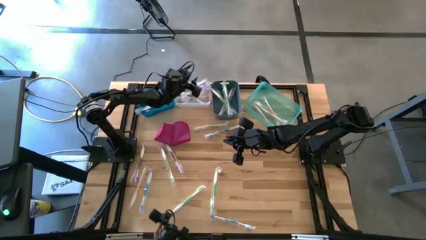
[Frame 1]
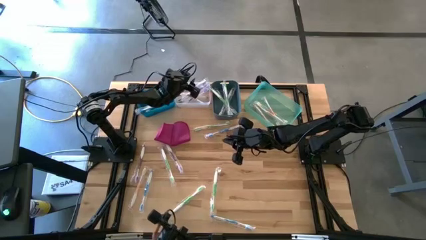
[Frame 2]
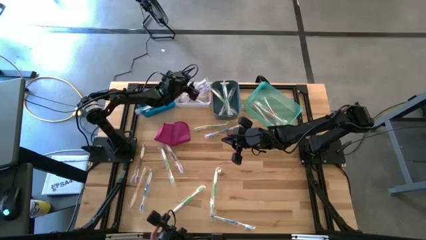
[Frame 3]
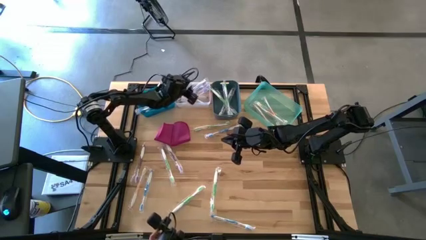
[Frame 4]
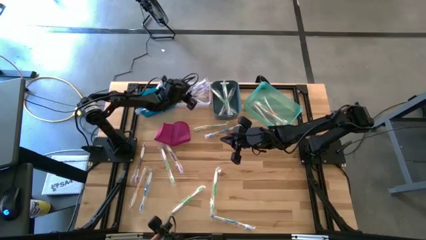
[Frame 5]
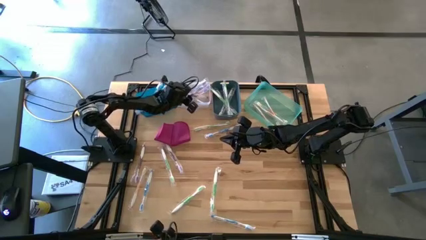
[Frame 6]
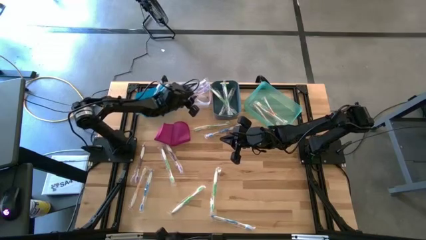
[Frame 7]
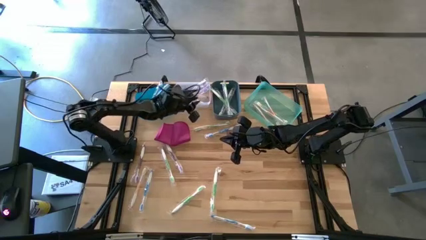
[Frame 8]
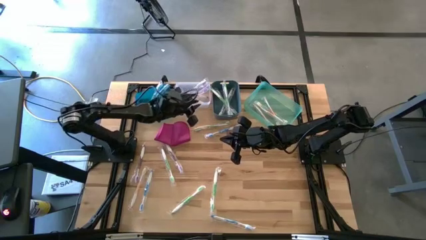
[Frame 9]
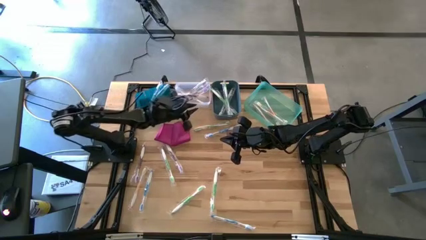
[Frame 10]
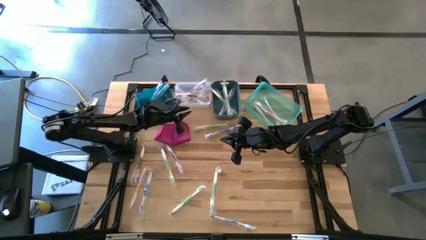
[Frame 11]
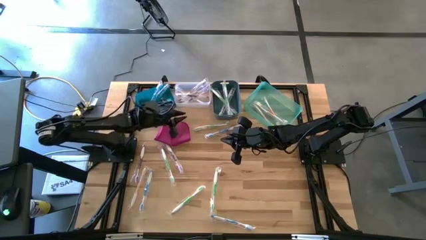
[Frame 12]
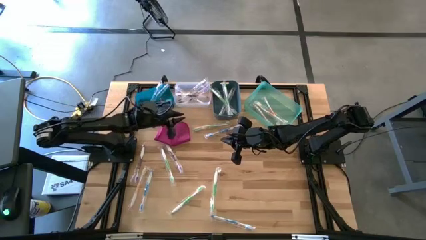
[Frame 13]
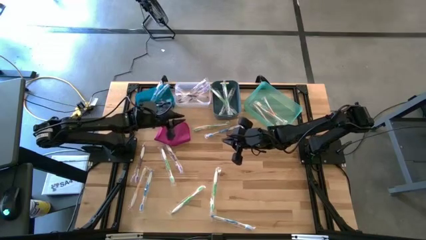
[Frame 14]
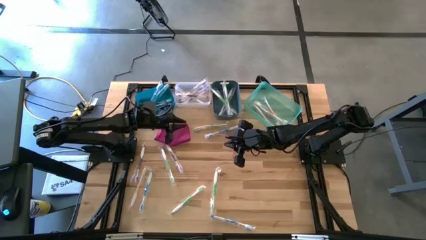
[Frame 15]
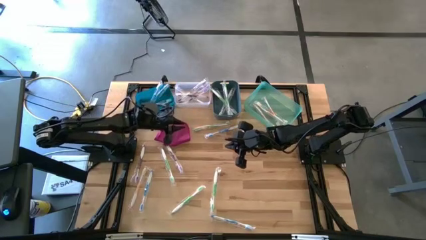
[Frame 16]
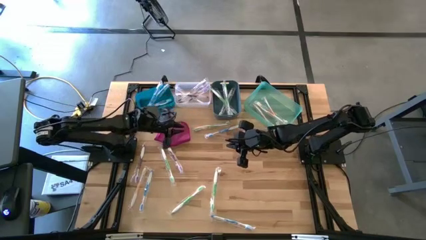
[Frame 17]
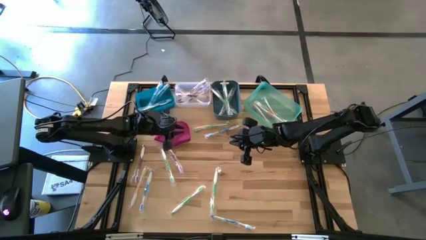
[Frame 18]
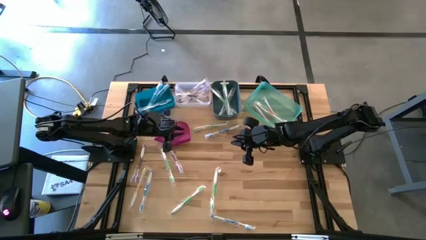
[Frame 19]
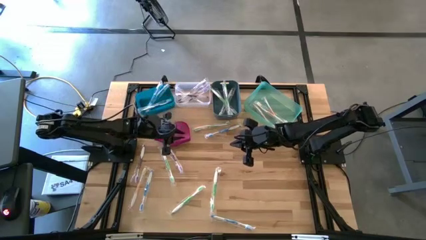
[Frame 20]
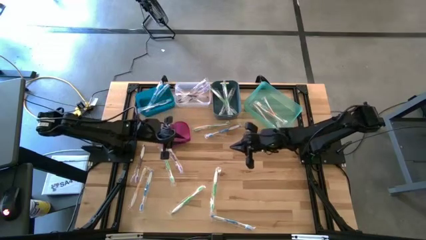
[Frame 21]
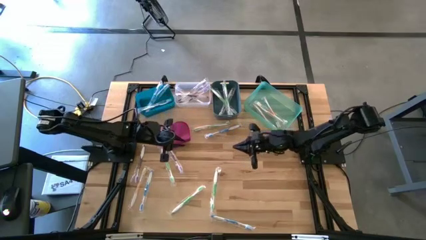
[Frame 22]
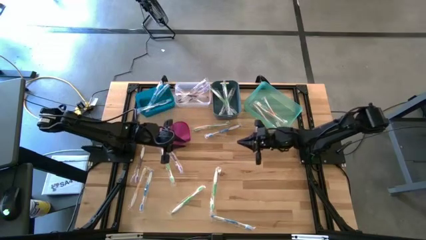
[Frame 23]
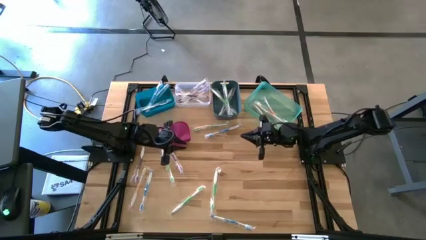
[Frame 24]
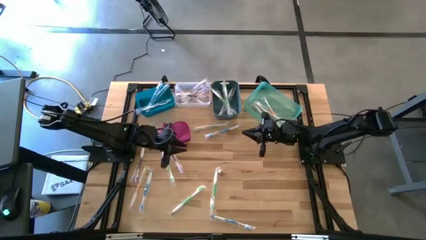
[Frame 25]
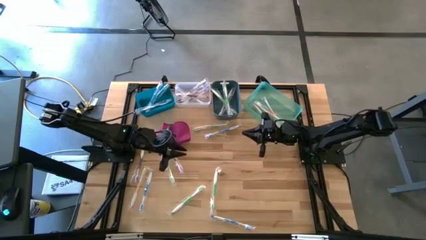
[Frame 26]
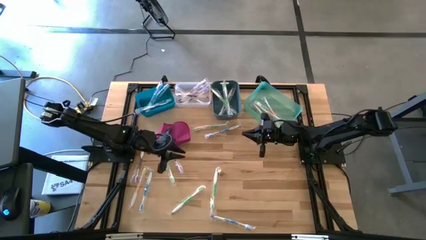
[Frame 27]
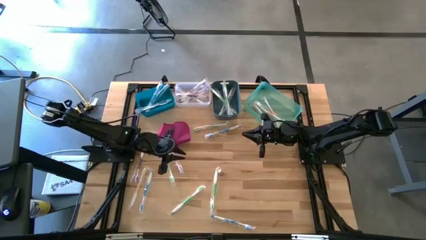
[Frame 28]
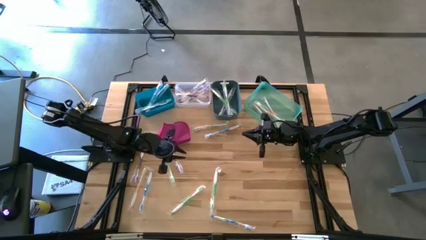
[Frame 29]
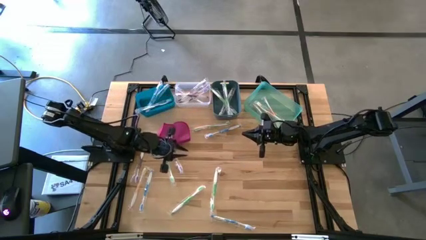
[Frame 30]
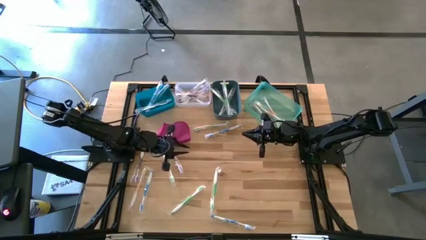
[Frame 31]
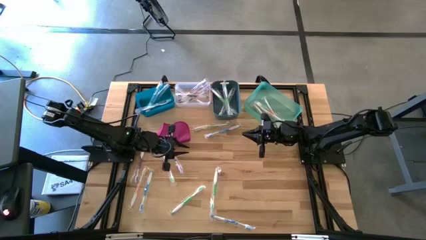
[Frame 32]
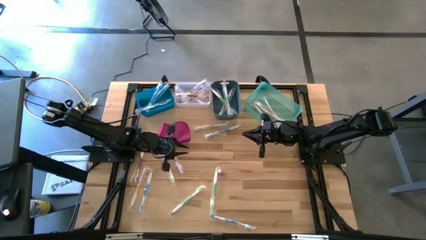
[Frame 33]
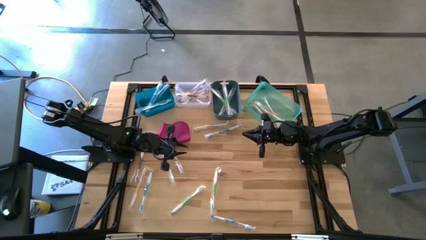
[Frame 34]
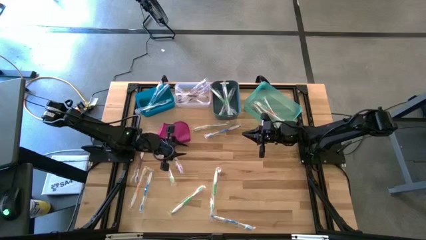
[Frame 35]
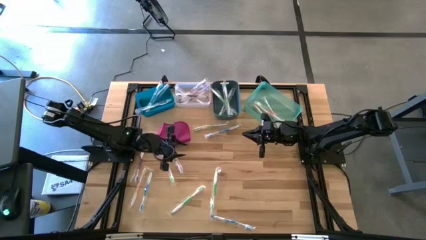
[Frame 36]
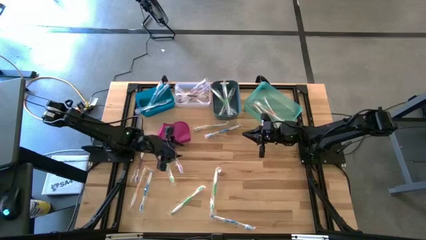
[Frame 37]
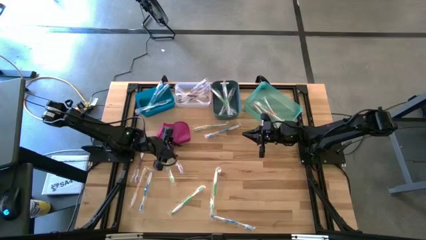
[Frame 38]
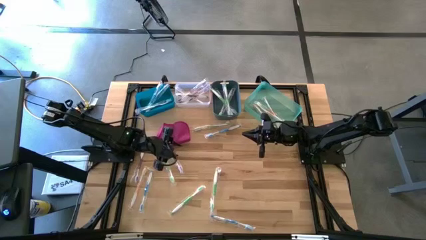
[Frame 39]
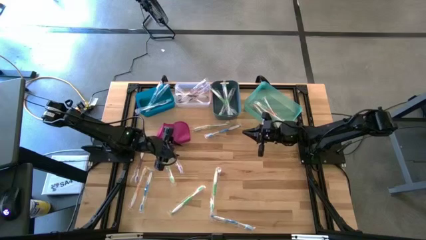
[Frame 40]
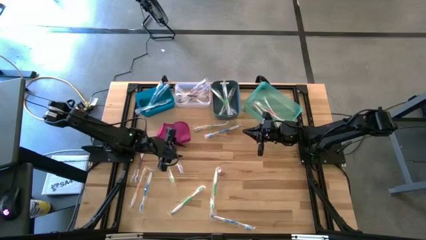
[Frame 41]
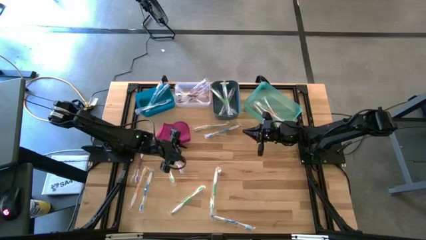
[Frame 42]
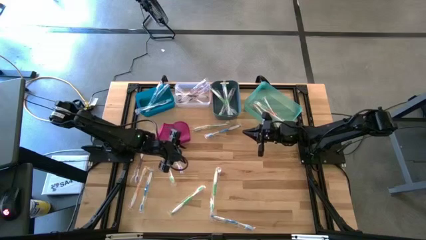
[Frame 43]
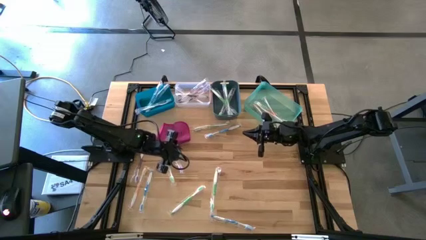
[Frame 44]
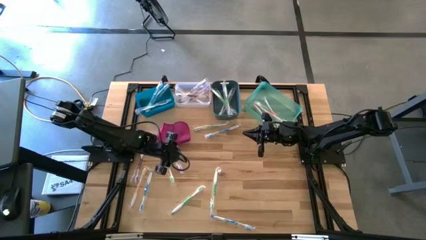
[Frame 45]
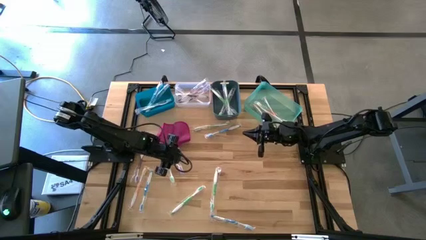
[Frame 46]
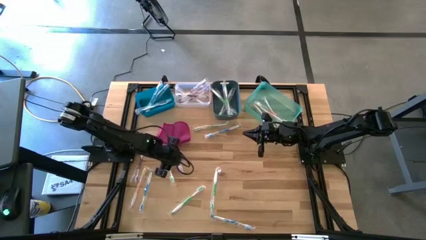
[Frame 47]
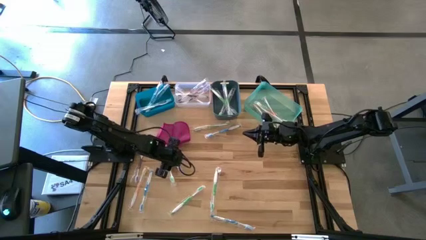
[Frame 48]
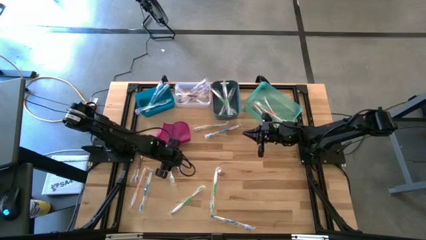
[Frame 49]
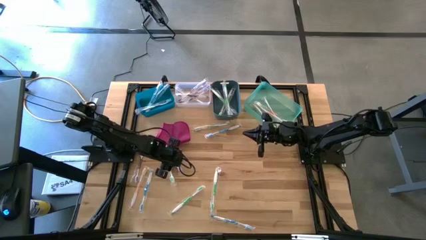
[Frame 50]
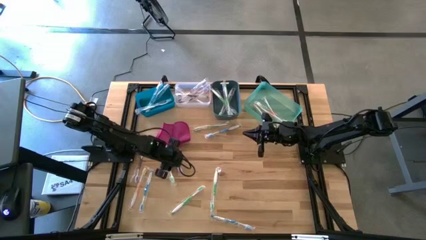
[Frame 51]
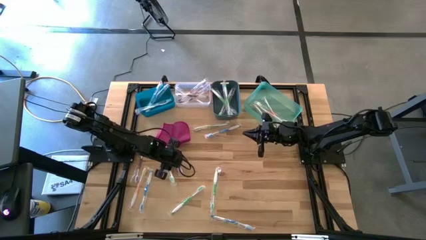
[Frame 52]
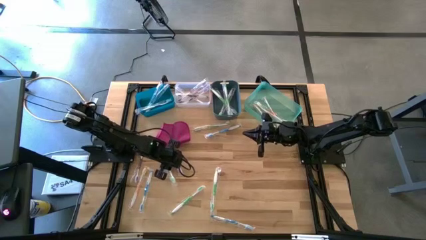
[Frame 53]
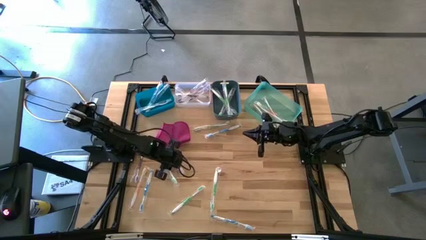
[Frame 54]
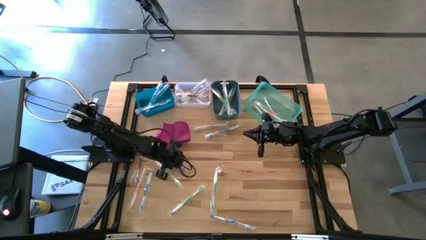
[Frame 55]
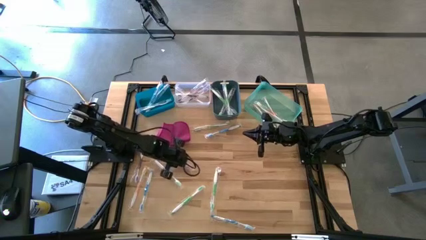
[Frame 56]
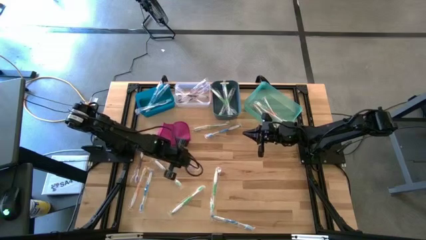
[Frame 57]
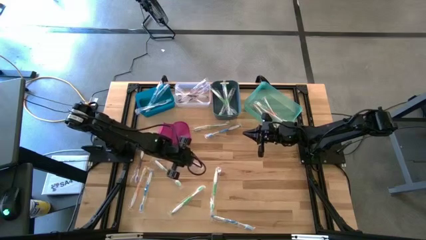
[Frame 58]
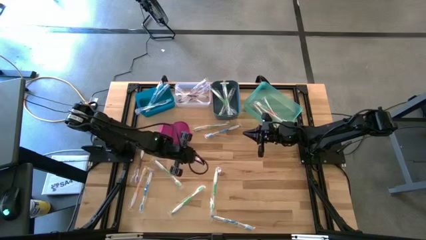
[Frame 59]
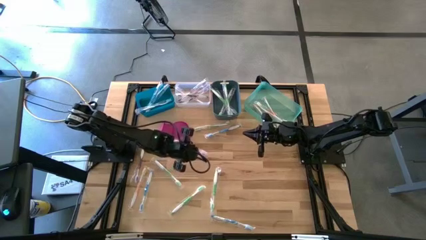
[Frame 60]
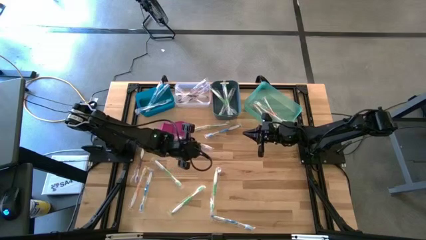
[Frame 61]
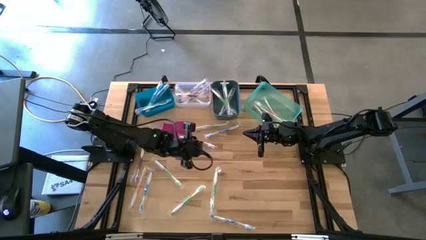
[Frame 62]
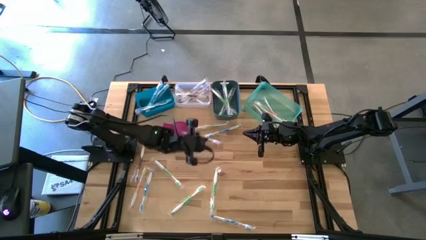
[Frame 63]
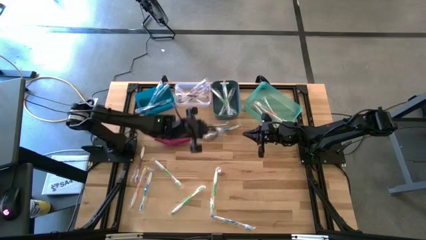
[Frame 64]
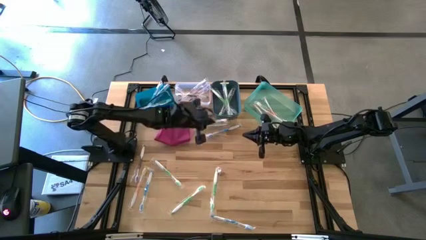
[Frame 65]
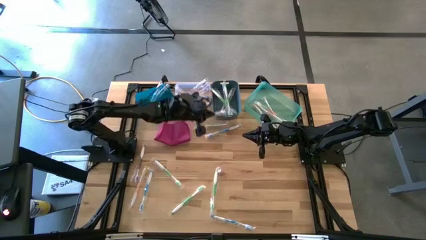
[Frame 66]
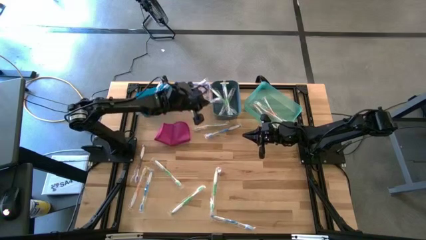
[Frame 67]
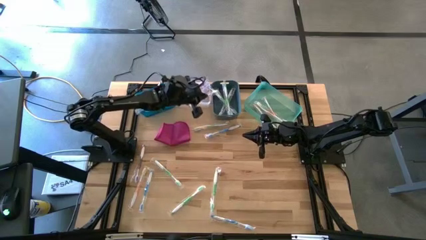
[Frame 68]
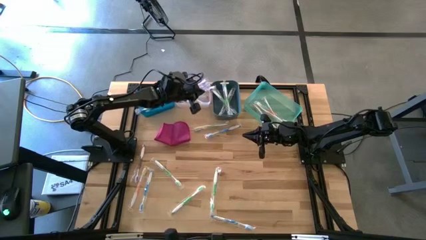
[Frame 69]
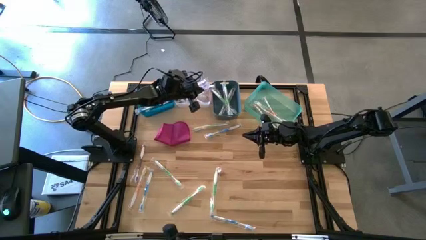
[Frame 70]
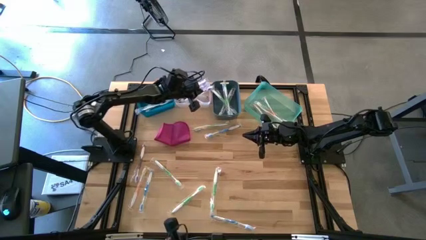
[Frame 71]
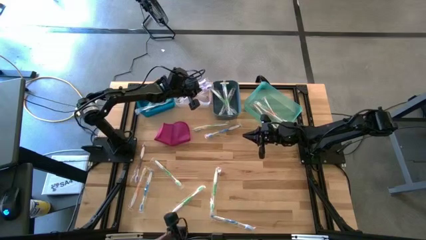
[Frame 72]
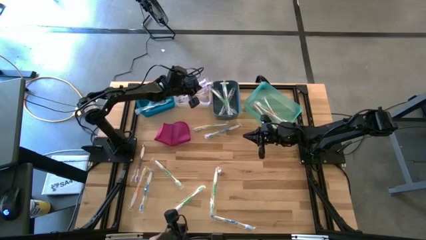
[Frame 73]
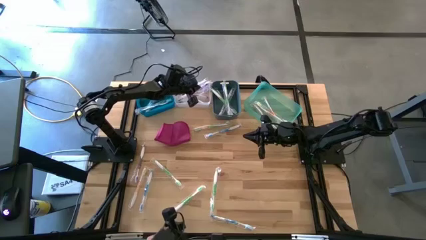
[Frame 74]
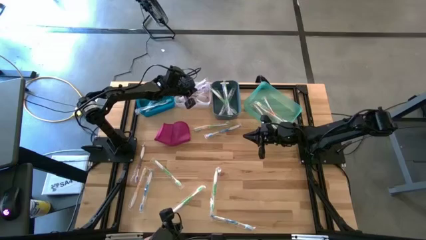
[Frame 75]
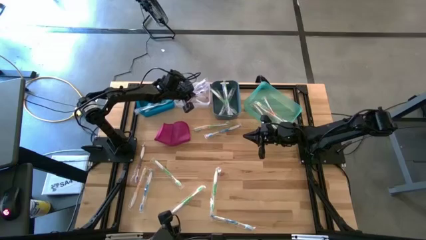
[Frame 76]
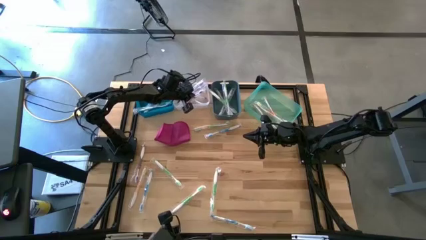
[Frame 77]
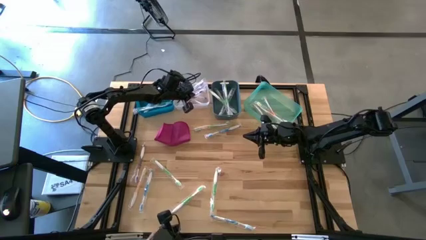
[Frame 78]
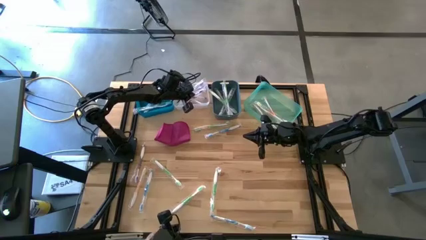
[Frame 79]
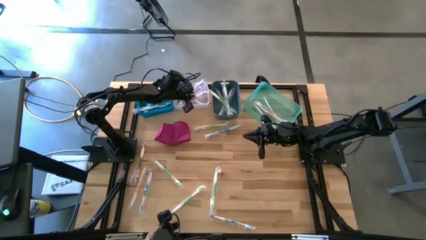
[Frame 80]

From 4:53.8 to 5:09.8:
Task: Pick & Place Toothbrushes
Put the violet toothbrush into the white bin
